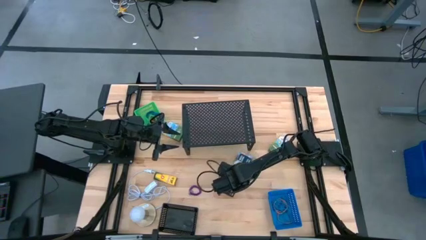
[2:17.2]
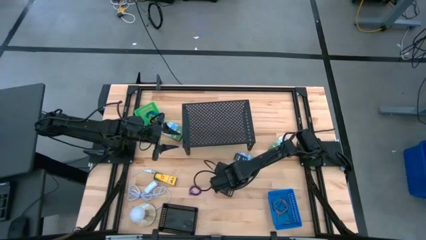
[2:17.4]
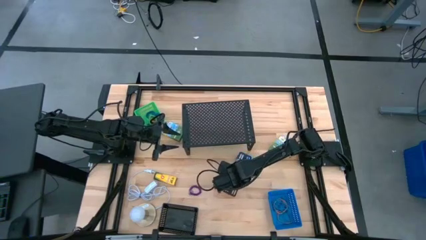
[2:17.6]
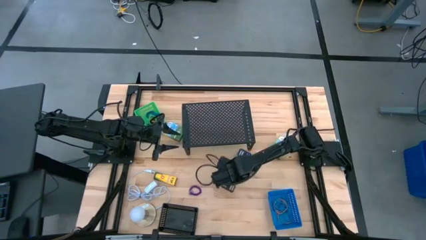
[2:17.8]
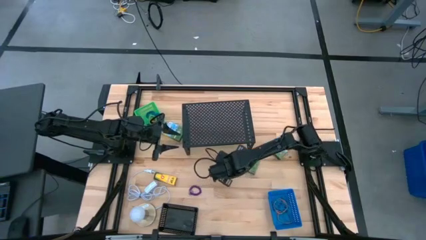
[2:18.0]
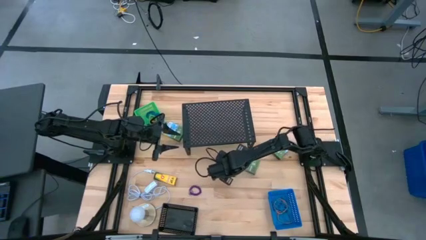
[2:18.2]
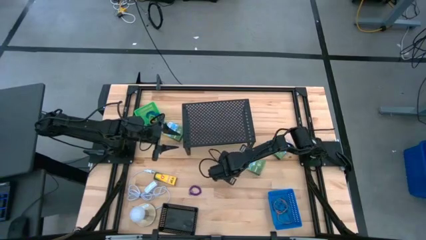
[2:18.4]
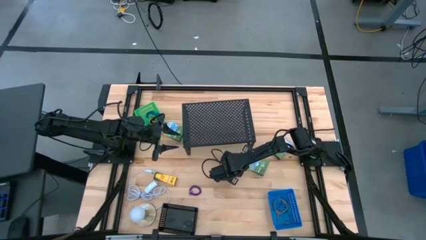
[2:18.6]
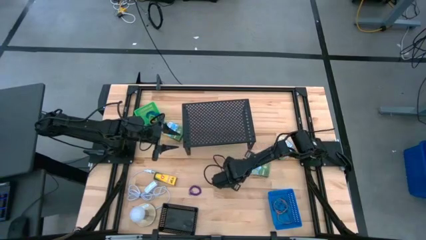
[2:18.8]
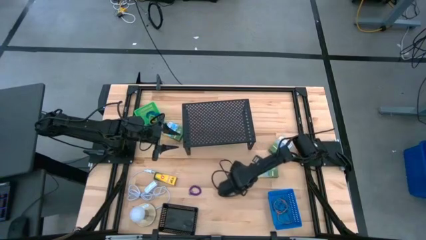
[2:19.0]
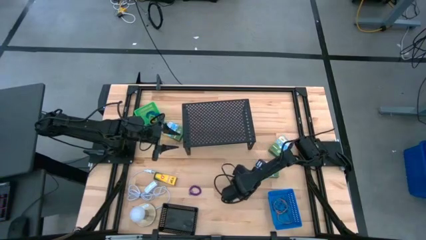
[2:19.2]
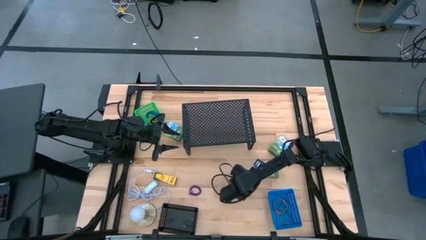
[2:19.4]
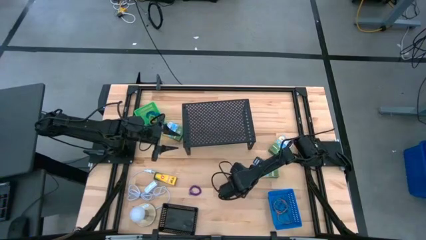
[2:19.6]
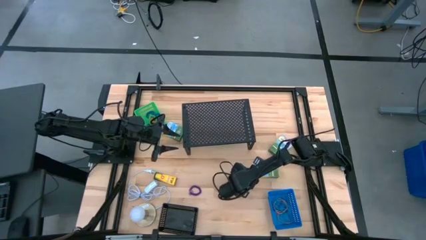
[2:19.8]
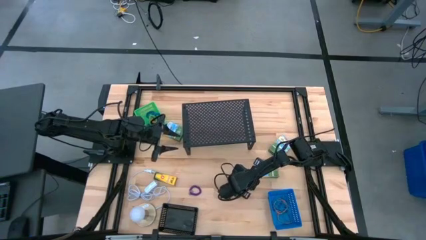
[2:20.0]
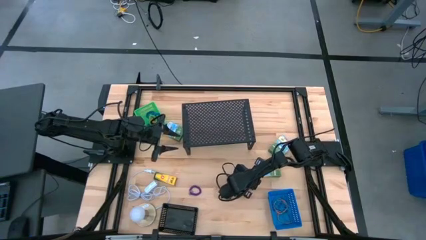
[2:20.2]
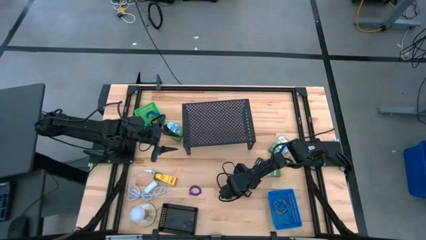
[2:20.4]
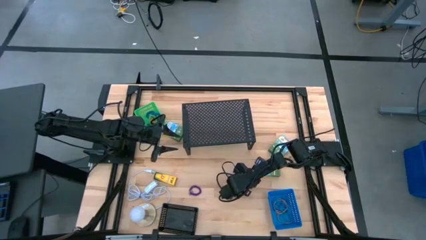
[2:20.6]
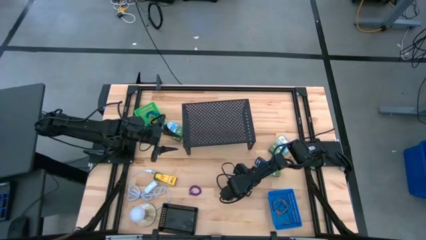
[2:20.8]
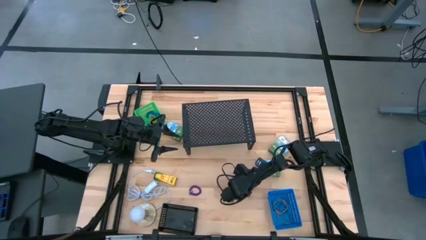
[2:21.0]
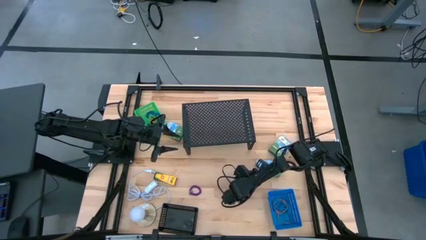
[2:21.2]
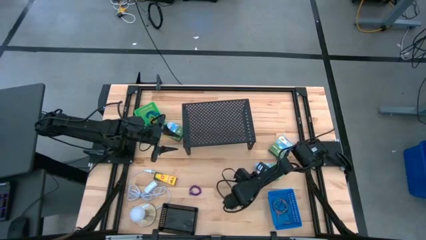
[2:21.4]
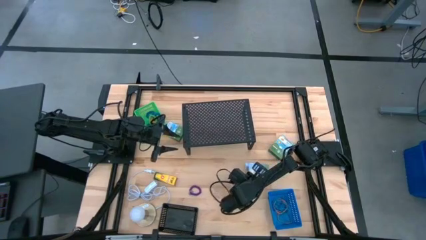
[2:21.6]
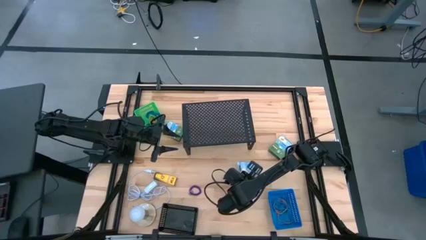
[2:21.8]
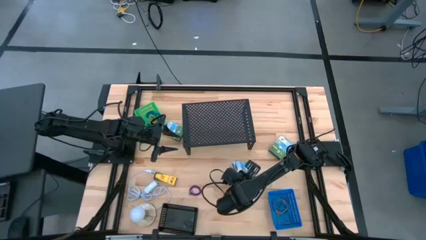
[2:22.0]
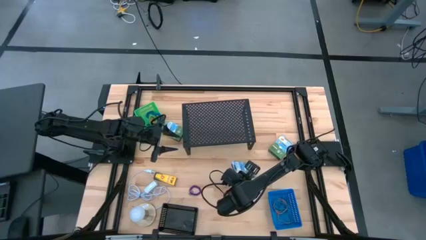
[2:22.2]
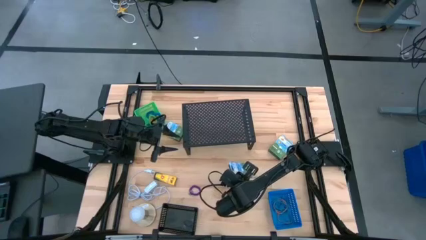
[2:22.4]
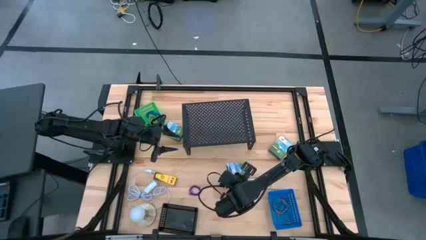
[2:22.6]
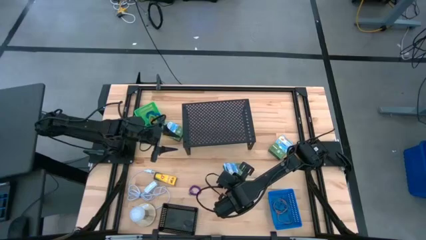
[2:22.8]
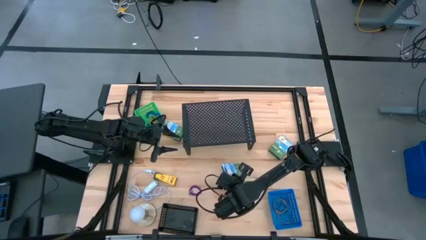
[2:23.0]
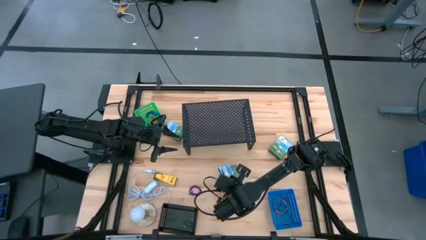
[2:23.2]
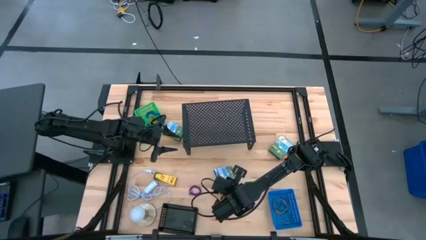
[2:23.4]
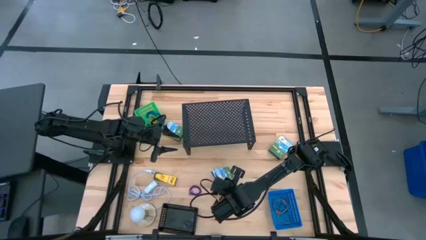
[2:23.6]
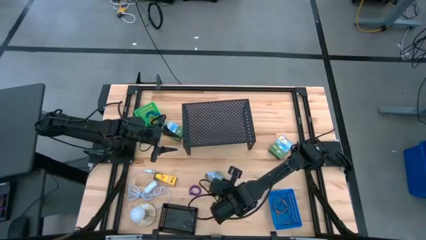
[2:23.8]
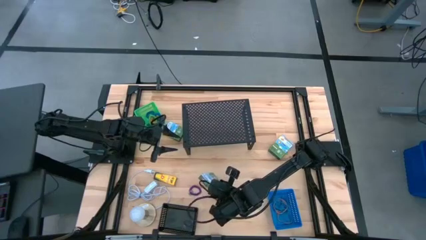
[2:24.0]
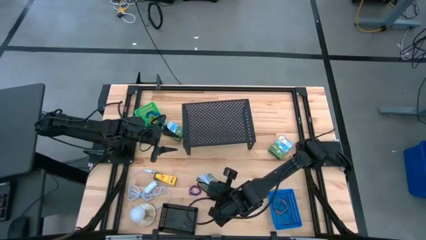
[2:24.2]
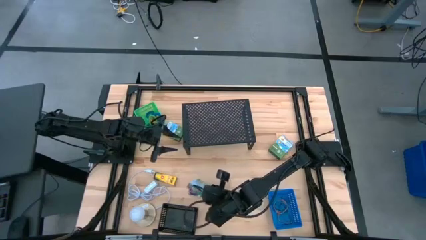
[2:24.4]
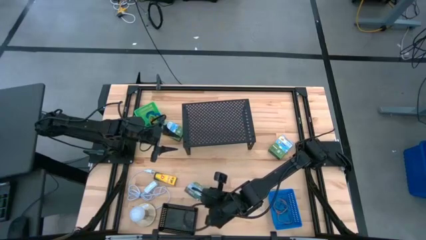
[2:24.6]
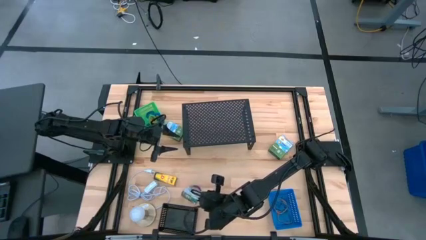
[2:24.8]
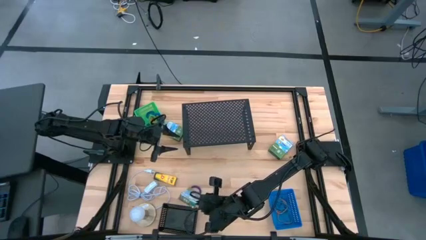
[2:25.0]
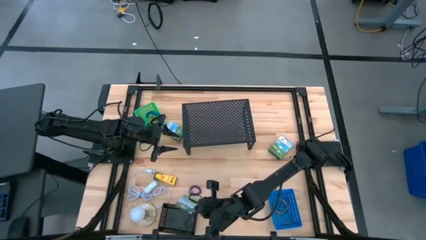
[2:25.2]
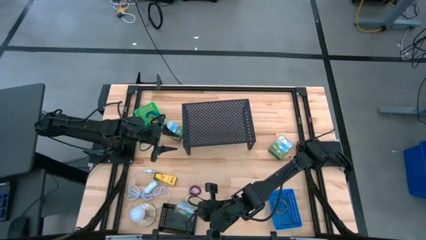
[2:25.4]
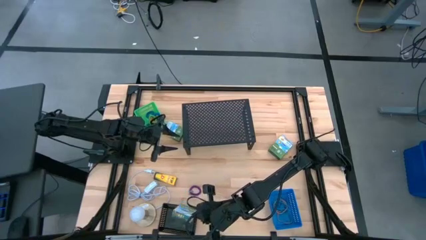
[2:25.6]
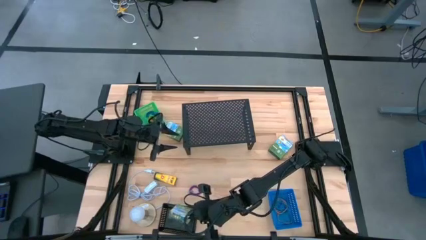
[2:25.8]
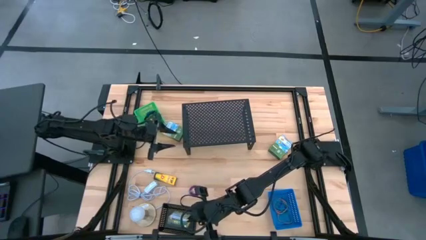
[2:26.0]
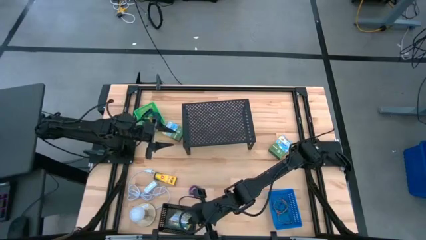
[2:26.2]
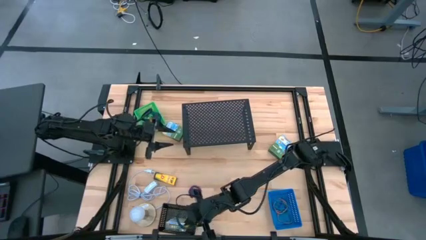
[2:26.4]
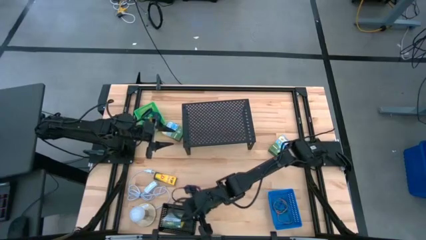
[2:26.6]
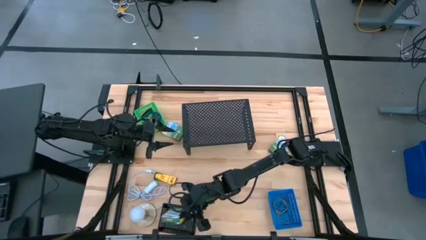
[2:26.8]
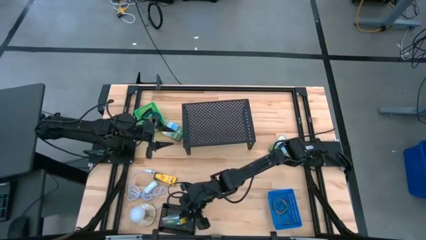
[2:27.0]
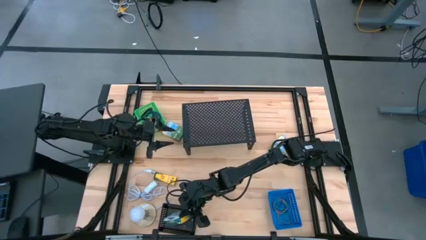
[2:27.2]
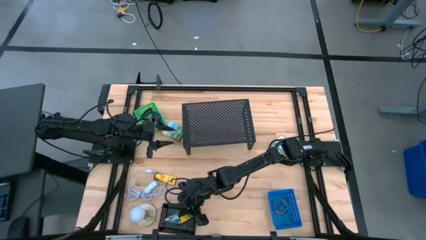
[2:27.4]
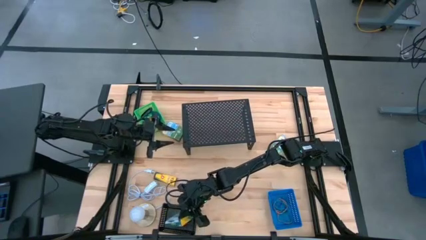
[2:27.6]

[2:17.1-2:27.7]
Task: Pick & Place Office Desk Supplies
Put the yellow crayon box into the black bin

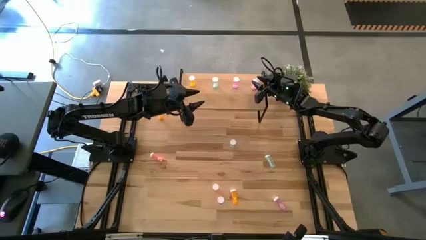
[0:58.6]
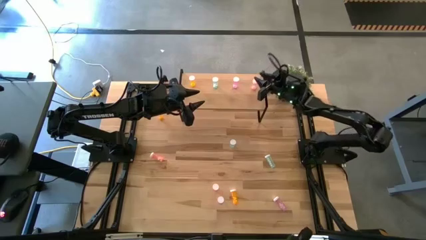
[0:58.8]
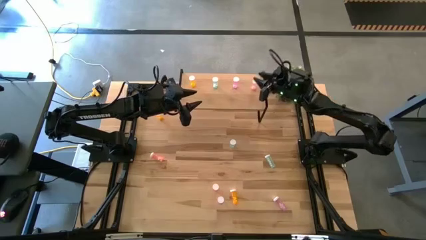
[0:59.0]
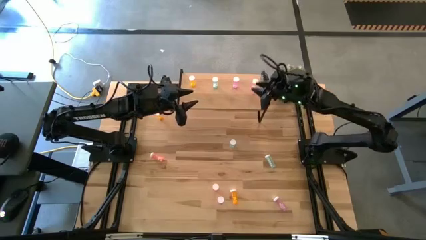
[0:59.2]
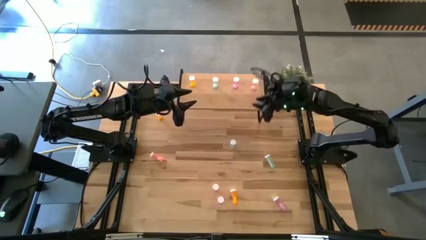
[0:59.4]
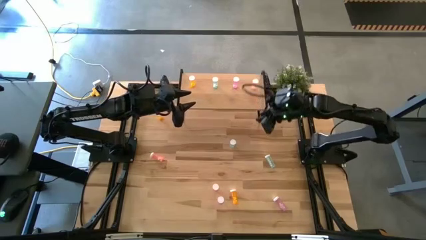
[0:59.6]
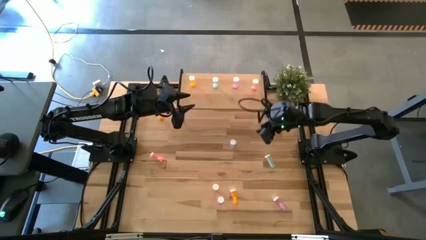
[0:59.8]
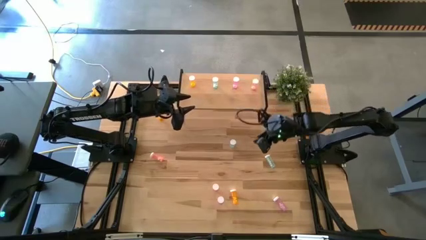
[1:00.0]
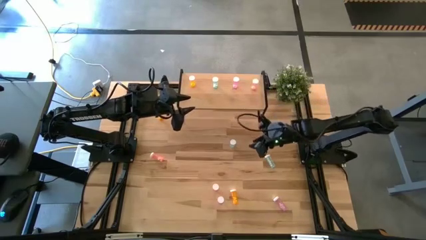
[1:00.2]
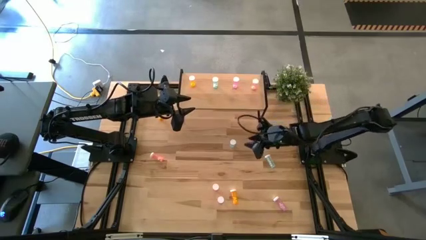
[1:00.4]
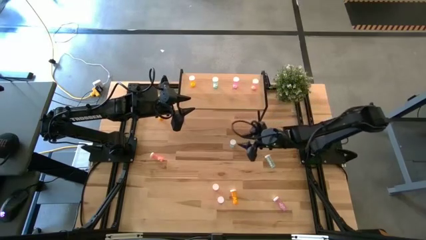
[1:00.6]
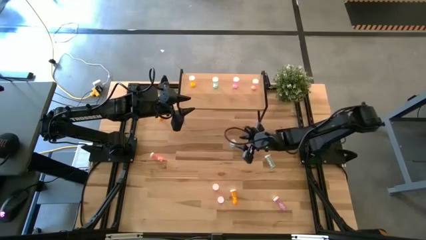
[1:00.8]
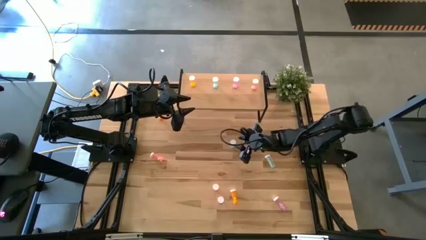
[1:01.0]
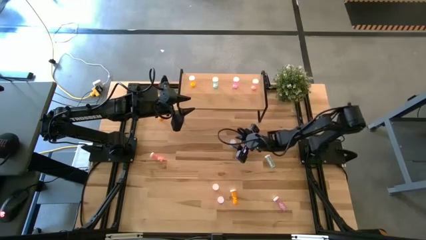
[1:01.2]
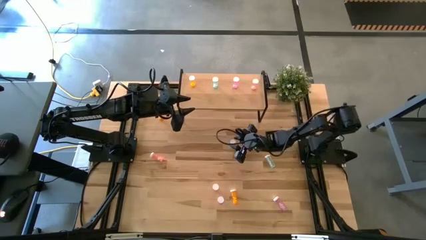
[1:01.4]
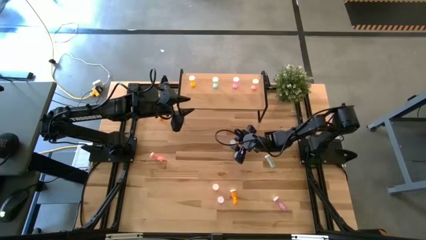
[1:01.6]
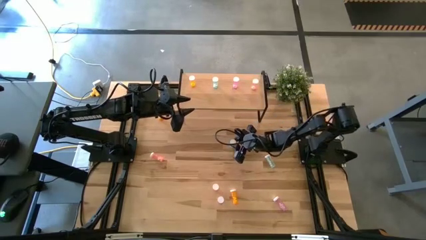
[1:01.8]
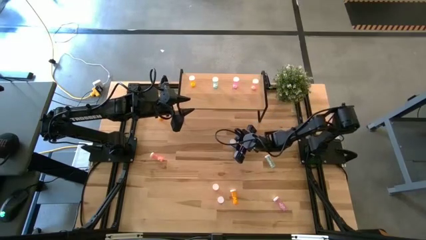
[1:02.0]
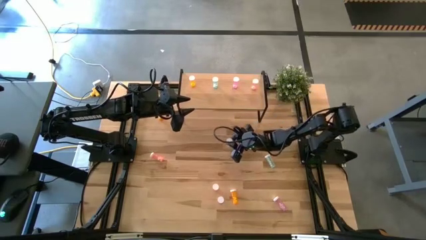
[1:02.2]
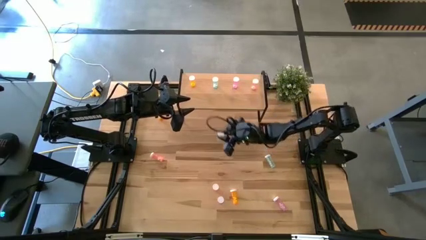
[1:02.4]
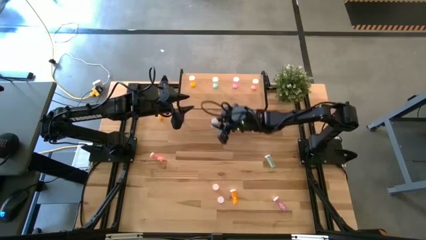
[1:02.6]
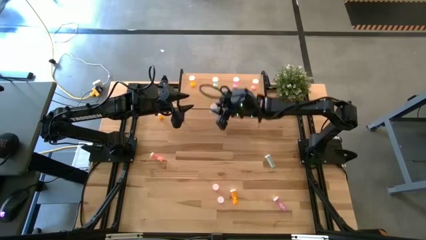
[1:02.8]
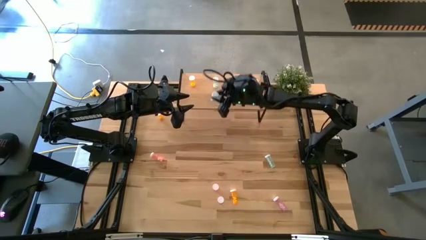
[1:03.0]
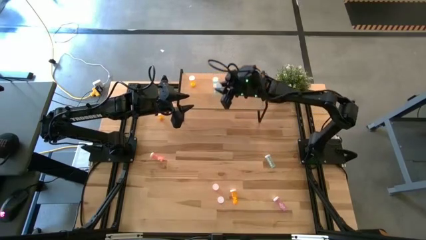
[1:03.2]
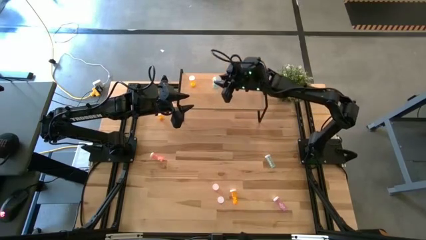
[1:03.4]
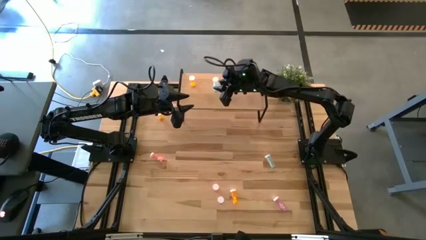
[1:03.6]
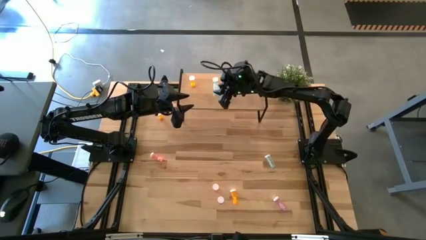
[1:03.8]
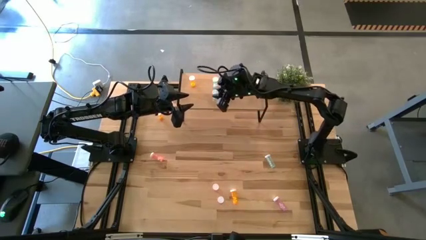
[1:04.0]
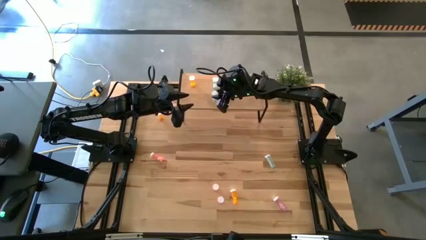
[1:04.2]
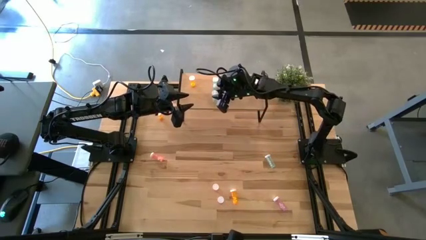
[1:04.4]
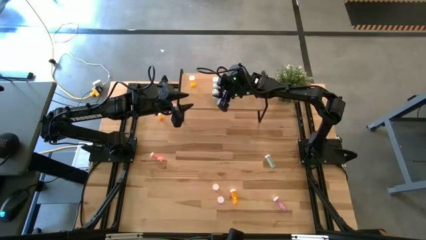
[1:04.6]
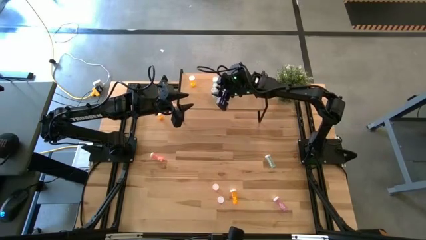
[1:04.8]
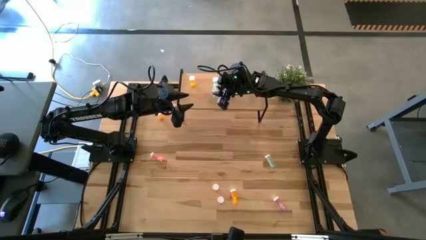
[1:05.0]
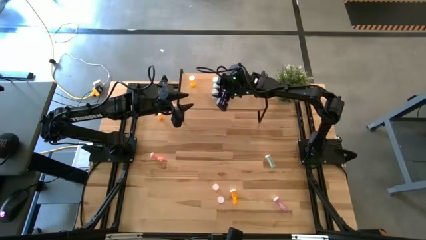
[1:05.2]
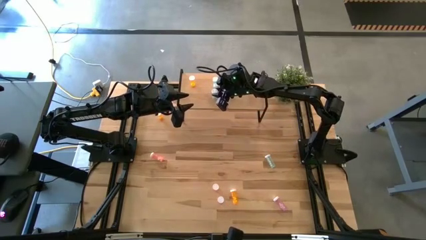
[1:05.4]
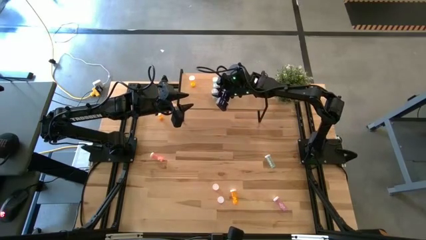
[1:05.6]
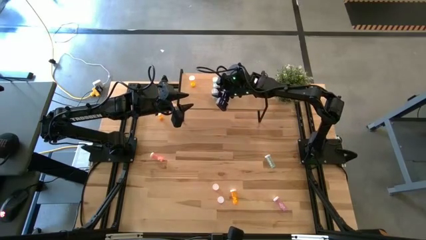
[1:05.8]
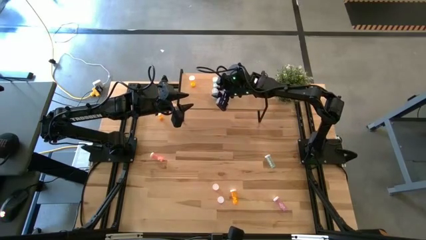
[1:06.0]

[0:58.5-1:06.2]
Task: Pick and place medicine bottles onto shelf by color
Put the left green pill bottle aligned with the other green pill bottle
